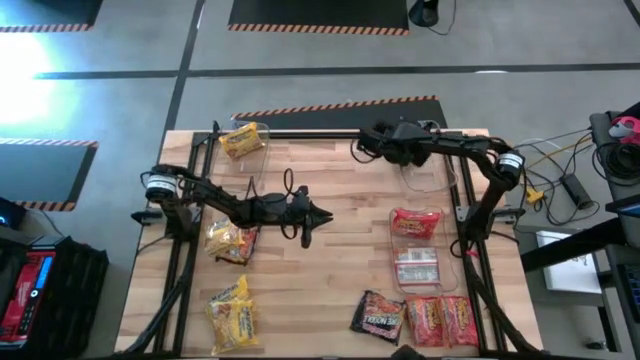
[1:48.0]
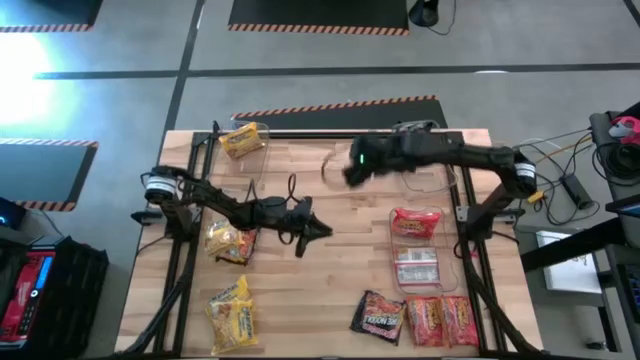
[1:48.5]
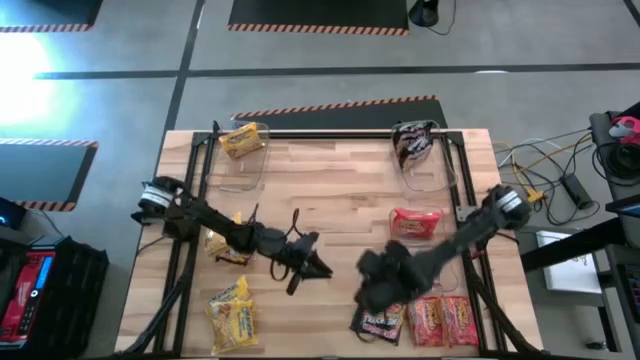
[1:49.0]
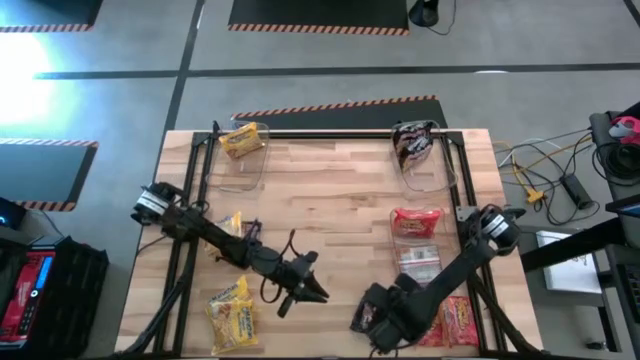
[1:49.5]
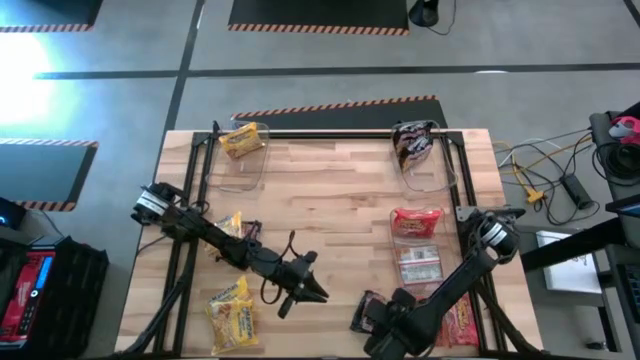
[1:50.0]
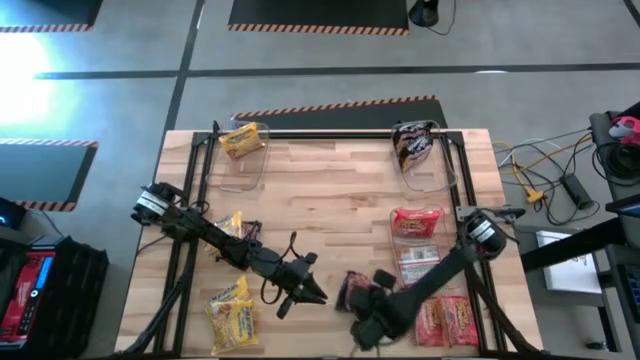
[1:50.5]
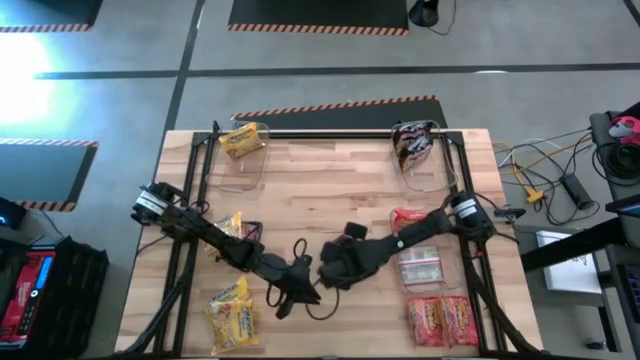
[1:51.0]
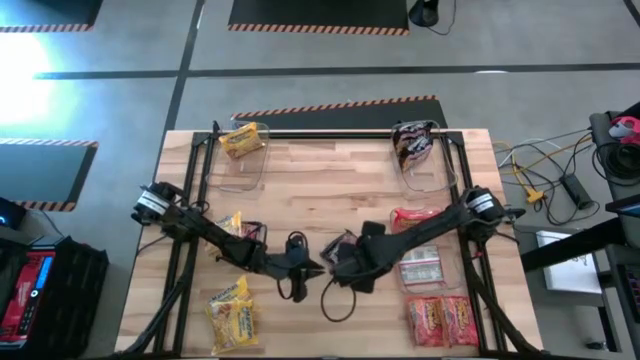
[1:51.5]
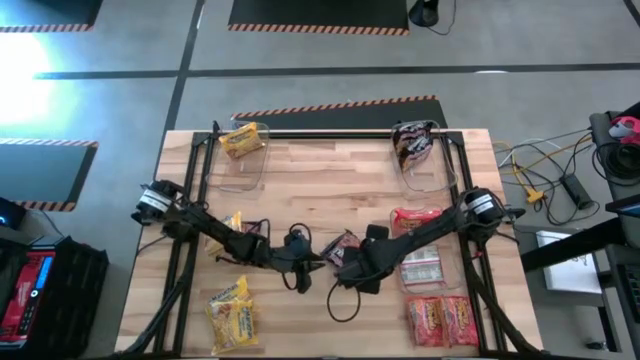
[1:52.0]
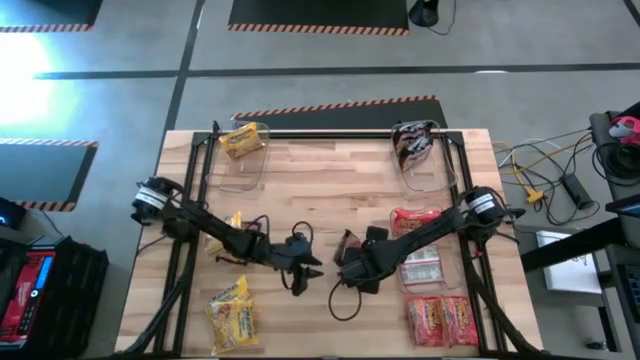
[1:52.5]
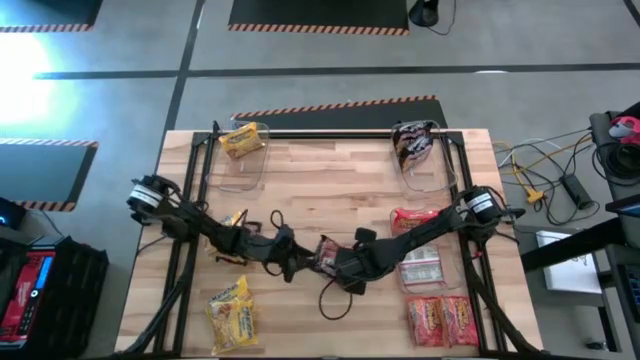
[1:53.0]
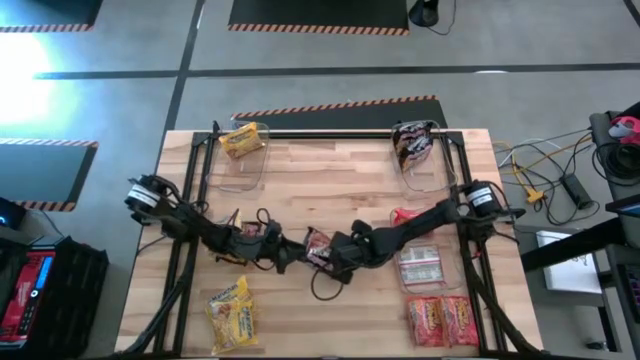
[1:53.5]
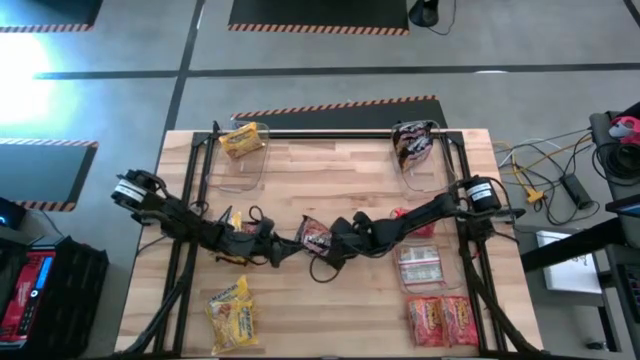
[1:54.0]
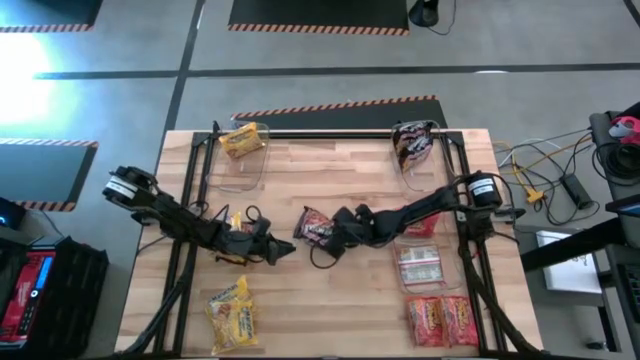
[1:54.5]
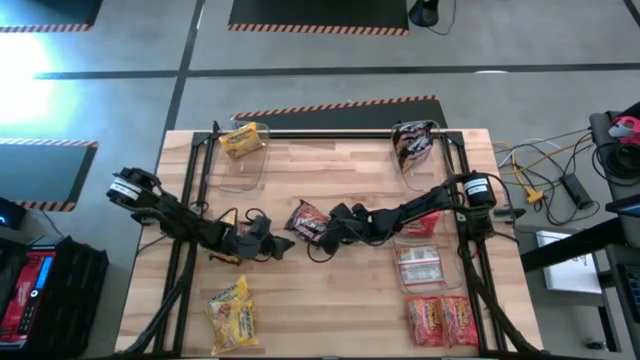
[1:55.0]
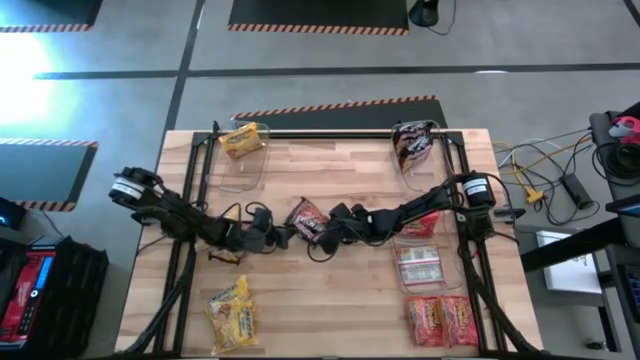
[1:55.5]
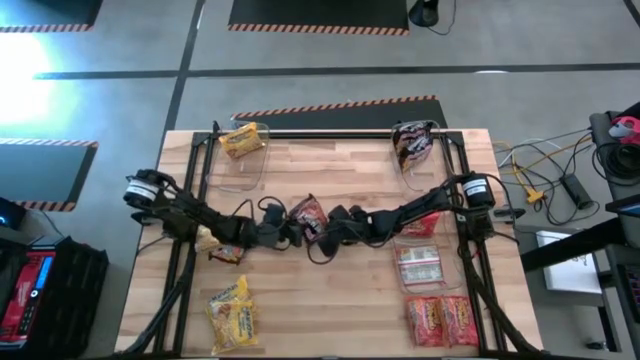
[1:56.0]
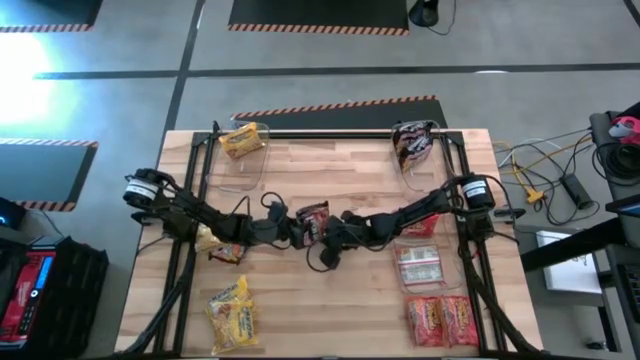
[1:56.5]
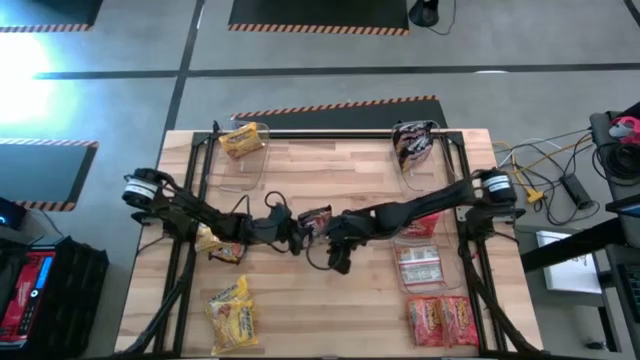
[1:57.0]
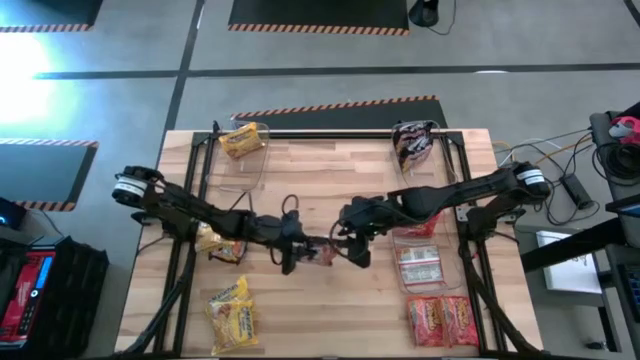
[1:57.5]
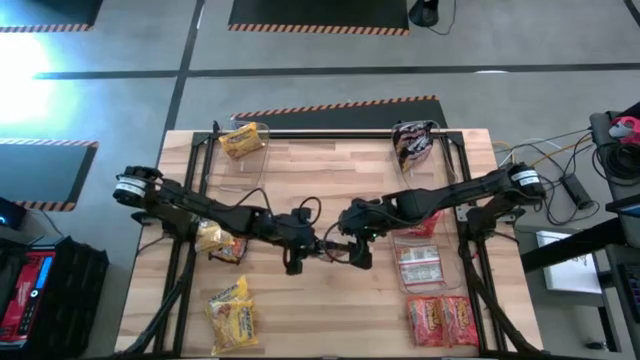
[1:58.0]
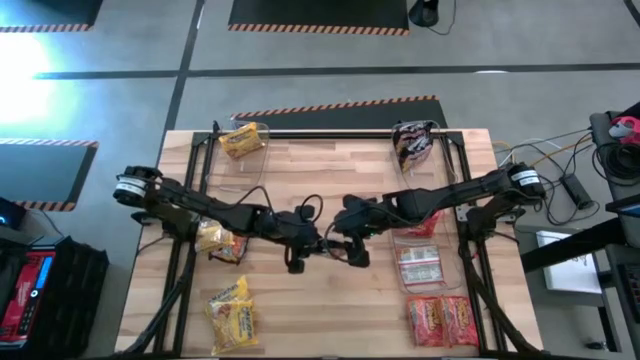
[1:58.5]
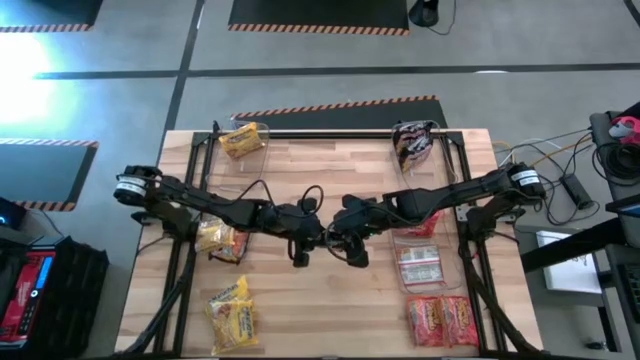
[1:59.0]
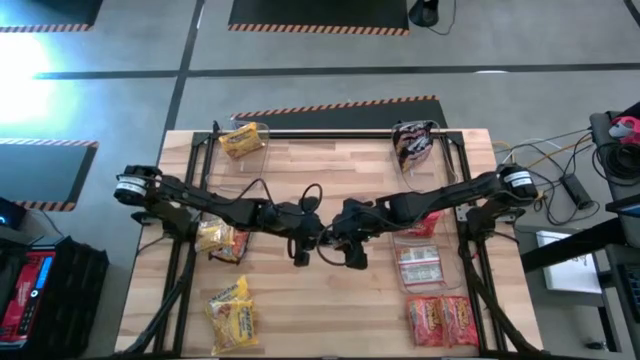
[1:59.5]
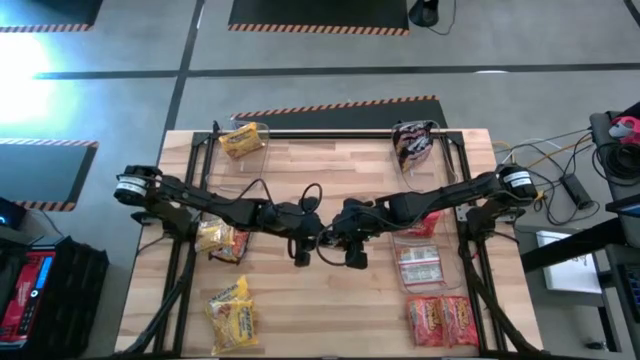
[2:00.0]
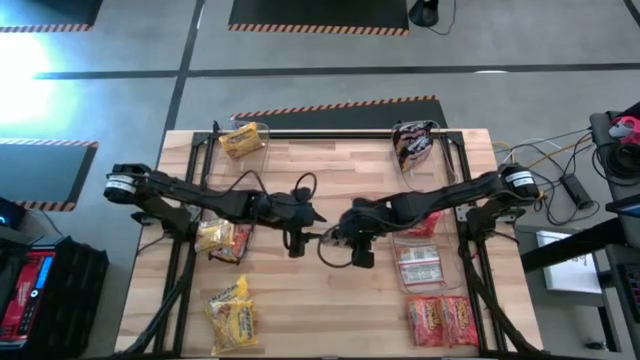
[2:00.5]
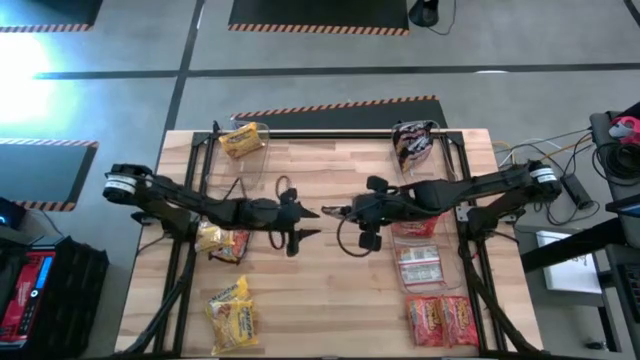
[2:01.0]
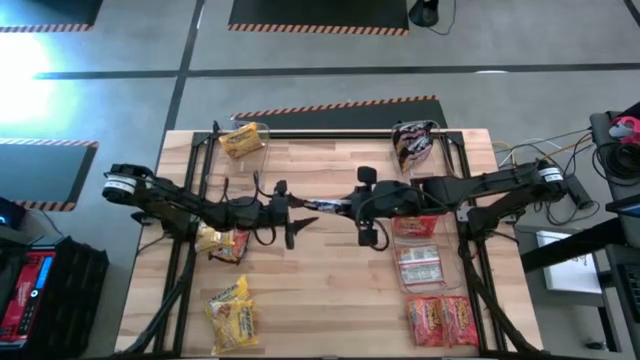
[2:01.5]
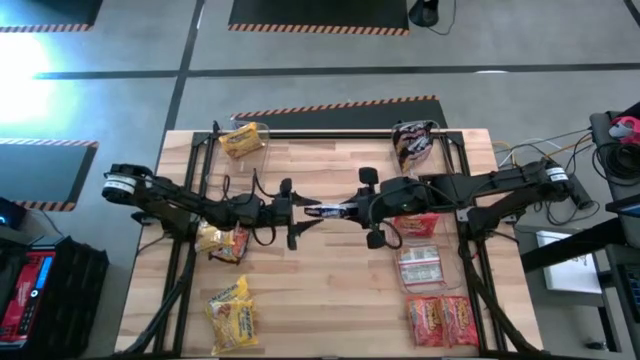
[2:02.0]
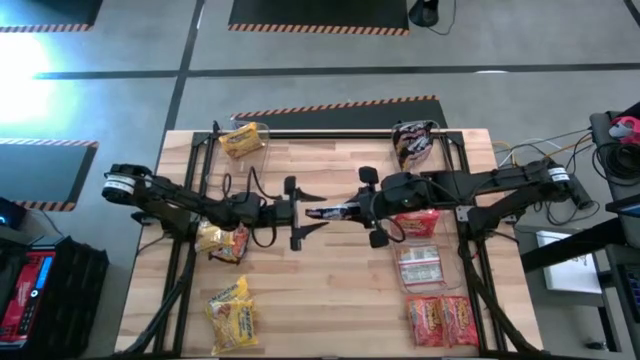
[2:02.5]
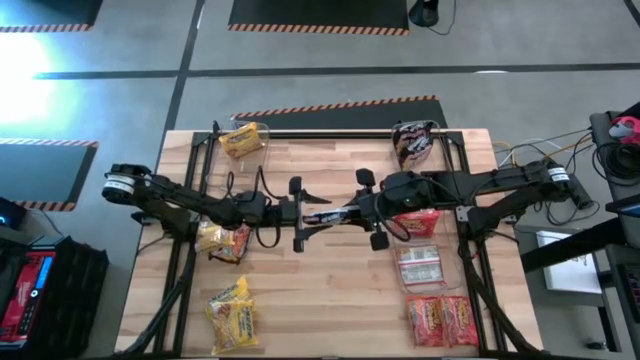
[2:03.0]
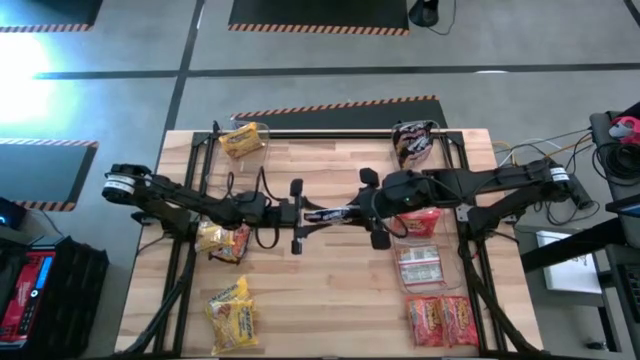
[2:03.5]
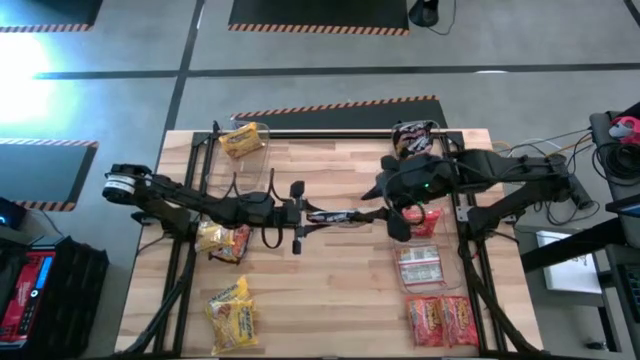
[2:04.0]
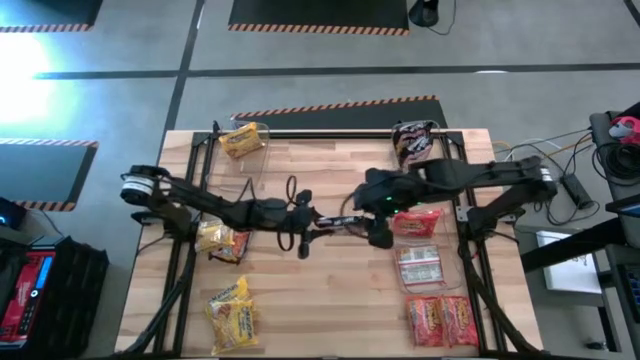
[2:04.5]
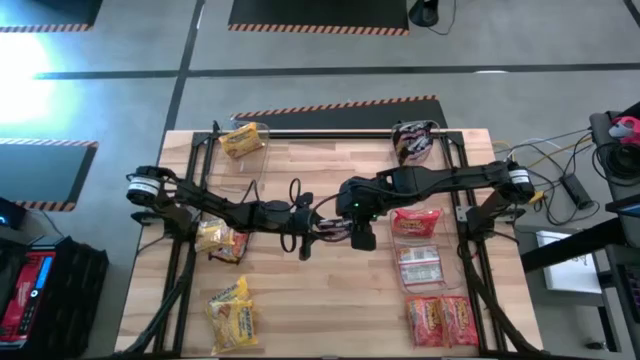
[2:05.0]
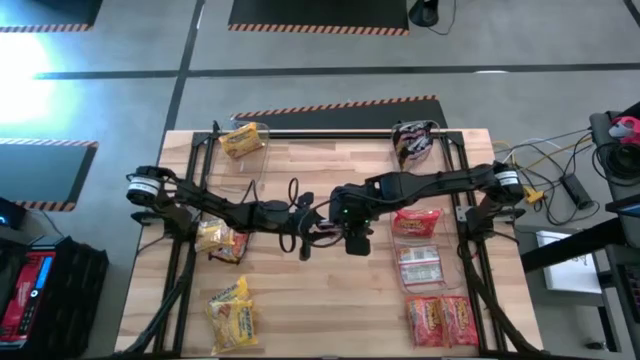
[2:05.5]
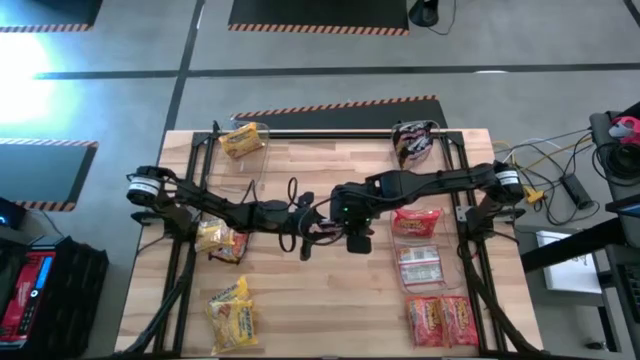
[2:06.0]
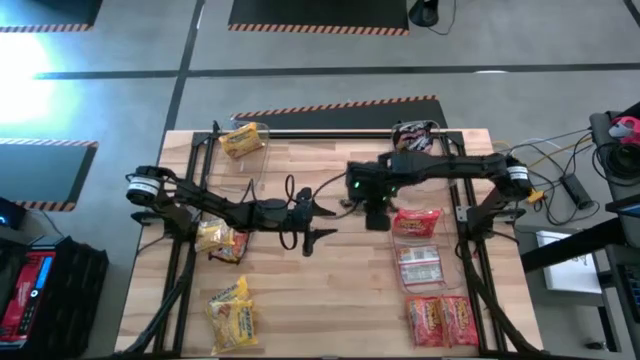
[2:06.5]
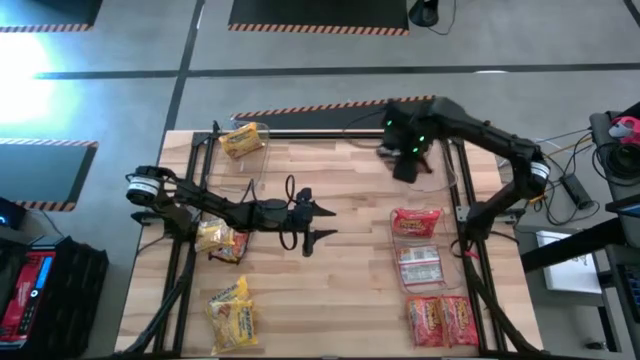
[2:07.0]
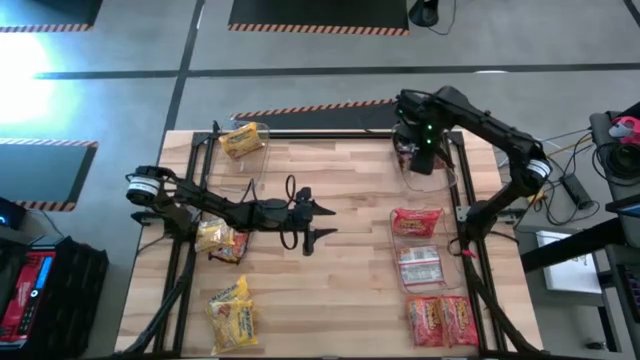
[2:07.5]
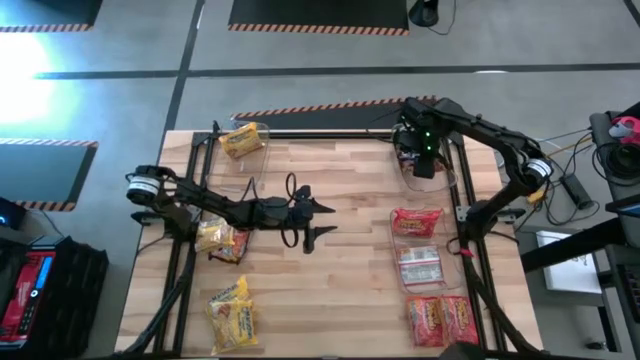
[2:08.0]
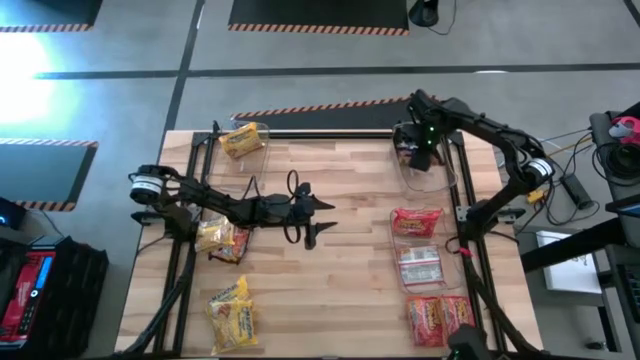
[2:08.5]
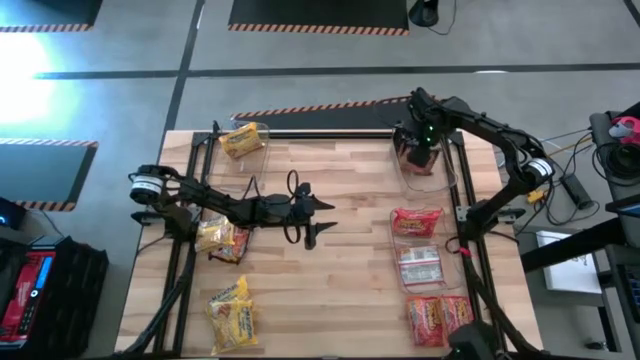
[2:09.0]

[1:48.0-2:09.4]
Task: Sort Maruchan noodles
Put the black noodle pack into the top right transparent bin
